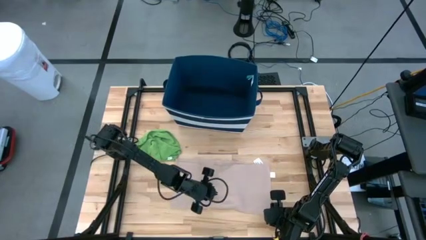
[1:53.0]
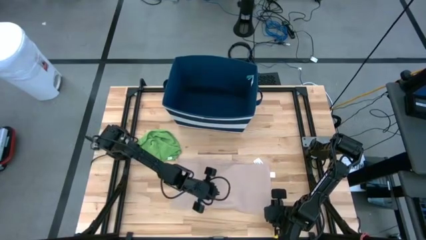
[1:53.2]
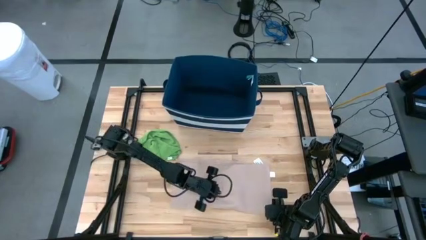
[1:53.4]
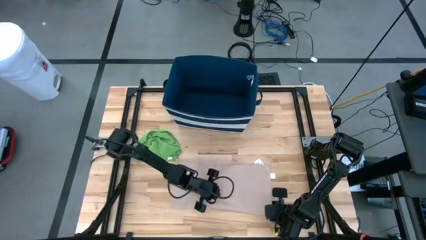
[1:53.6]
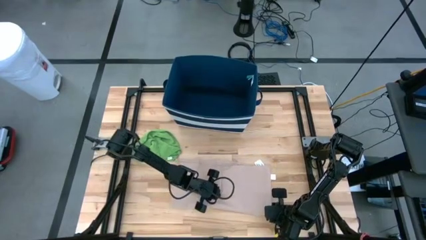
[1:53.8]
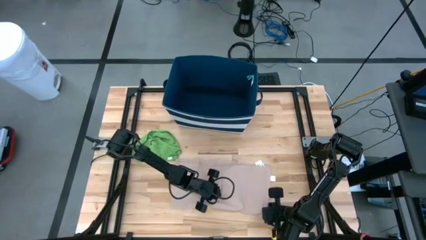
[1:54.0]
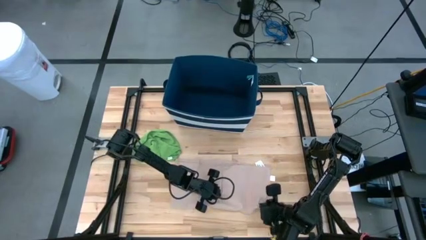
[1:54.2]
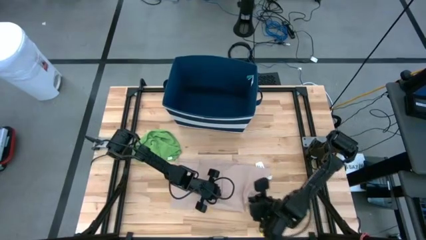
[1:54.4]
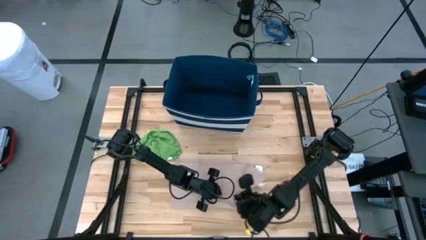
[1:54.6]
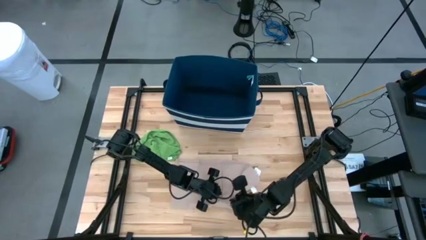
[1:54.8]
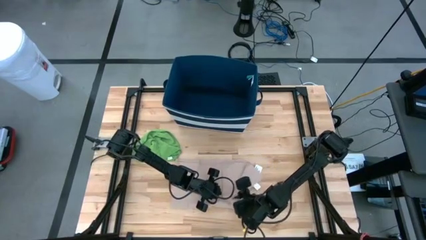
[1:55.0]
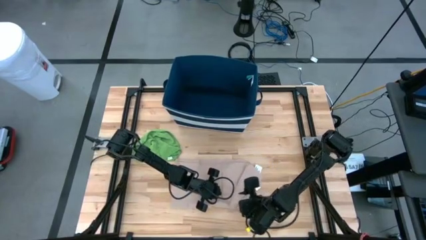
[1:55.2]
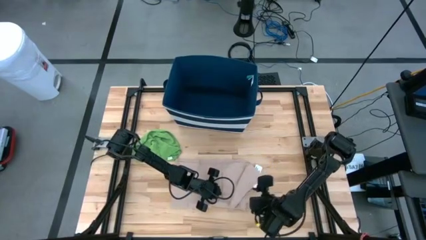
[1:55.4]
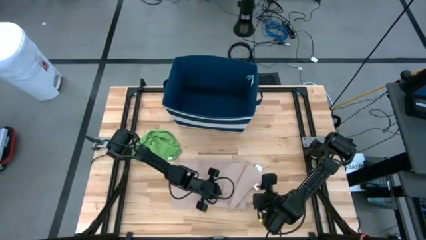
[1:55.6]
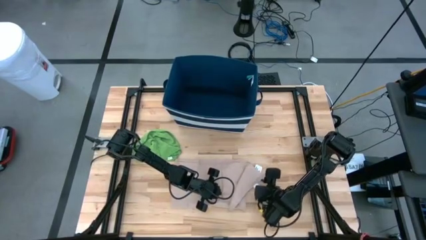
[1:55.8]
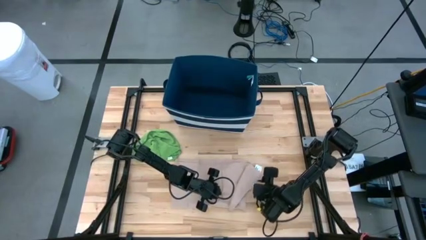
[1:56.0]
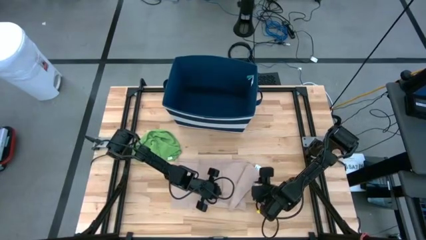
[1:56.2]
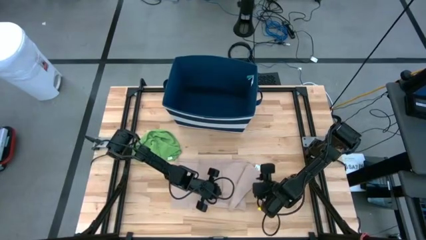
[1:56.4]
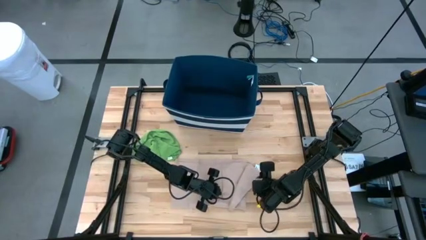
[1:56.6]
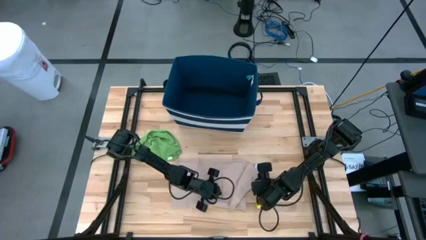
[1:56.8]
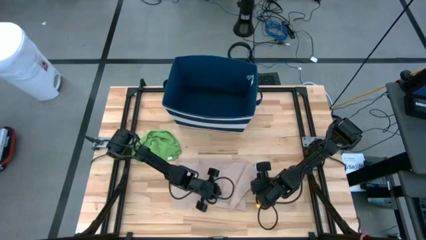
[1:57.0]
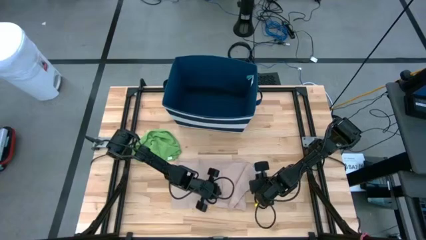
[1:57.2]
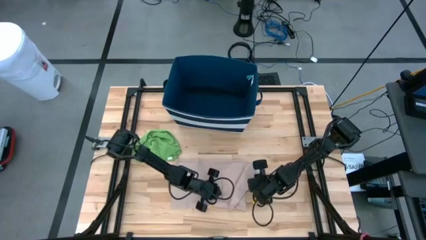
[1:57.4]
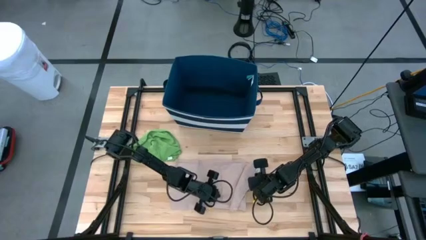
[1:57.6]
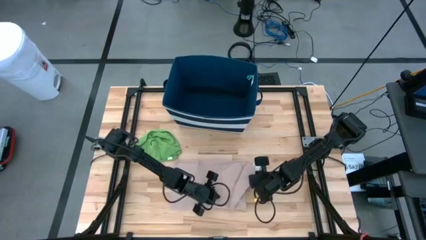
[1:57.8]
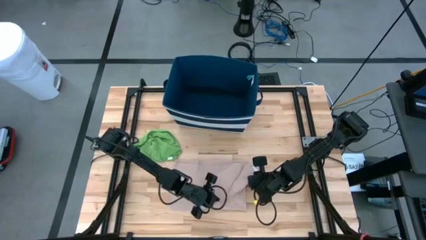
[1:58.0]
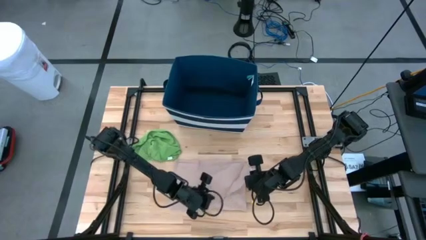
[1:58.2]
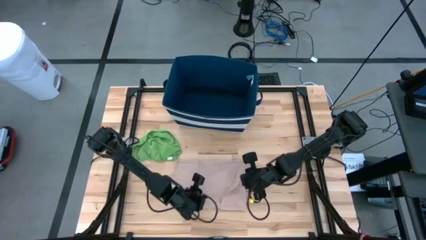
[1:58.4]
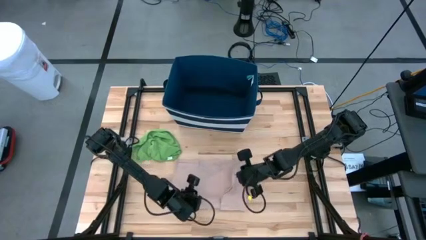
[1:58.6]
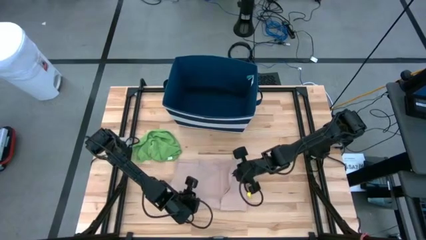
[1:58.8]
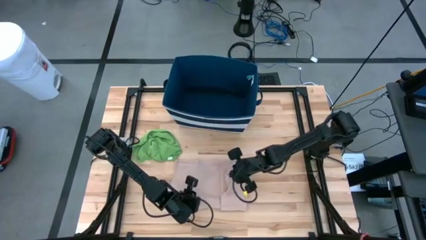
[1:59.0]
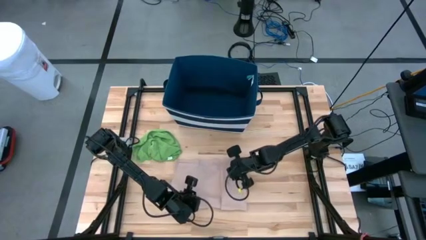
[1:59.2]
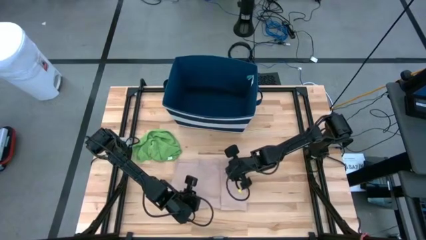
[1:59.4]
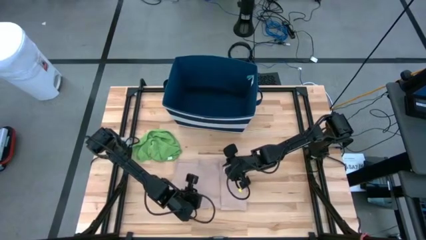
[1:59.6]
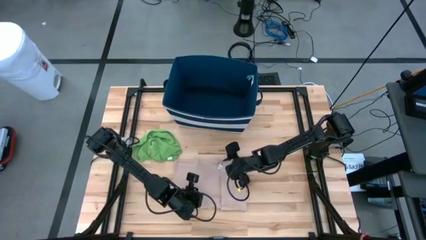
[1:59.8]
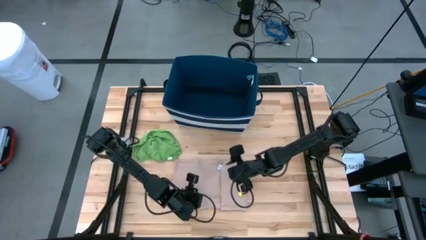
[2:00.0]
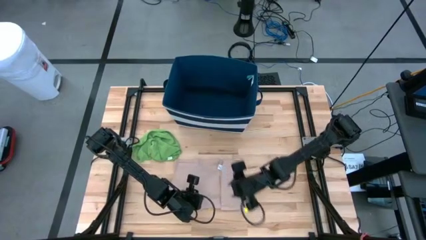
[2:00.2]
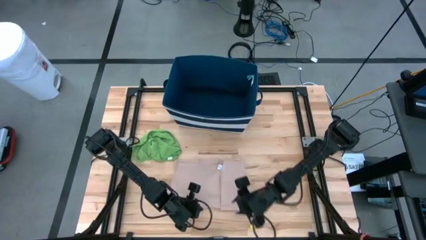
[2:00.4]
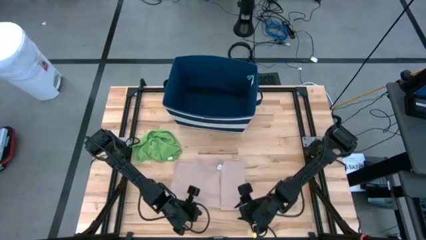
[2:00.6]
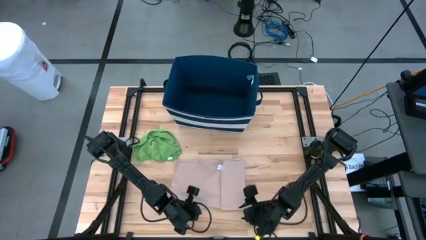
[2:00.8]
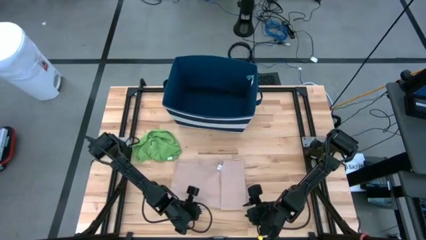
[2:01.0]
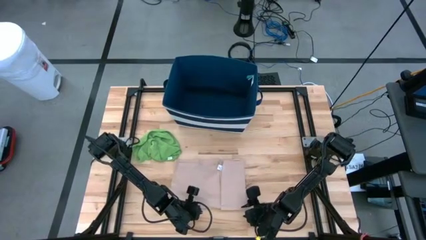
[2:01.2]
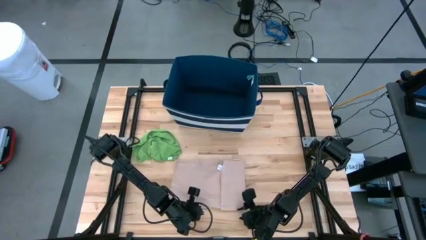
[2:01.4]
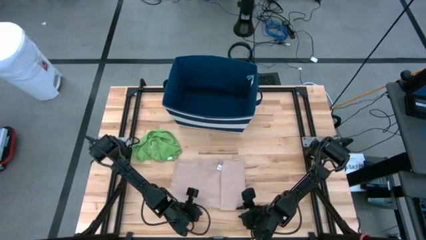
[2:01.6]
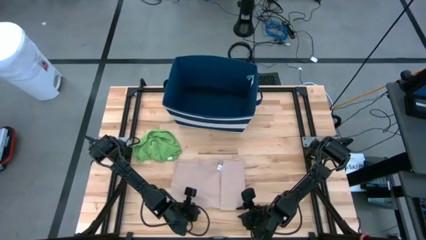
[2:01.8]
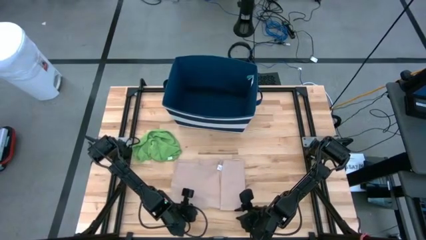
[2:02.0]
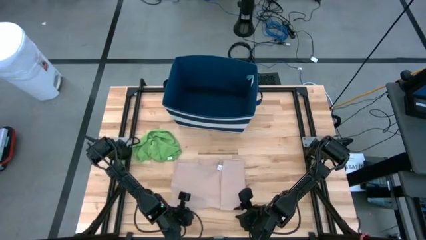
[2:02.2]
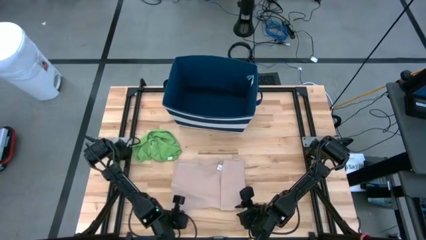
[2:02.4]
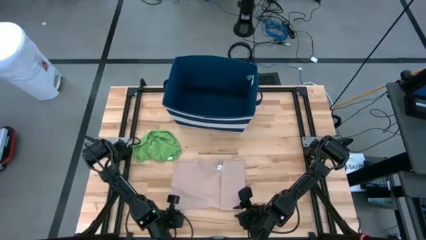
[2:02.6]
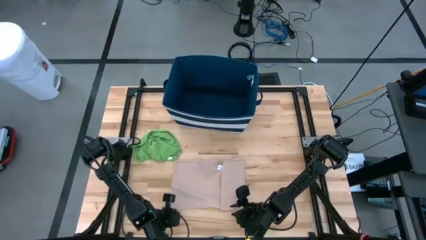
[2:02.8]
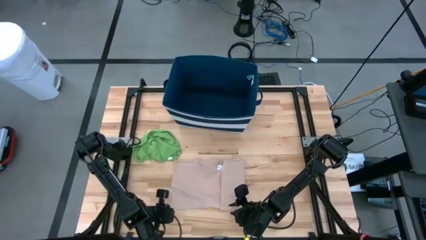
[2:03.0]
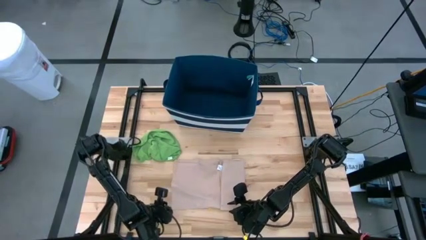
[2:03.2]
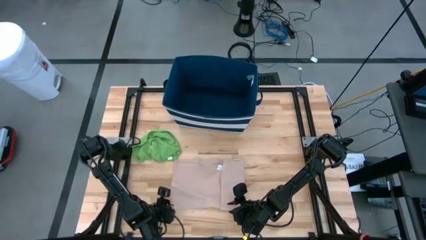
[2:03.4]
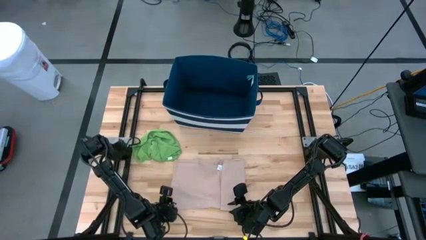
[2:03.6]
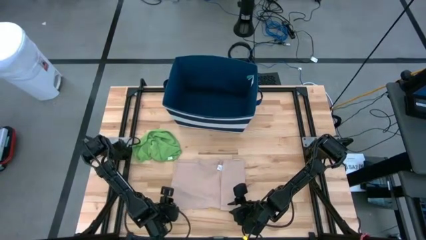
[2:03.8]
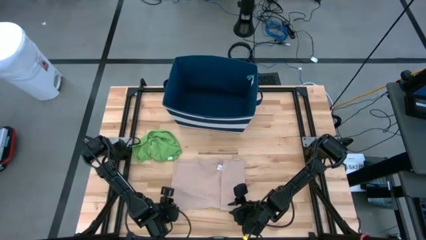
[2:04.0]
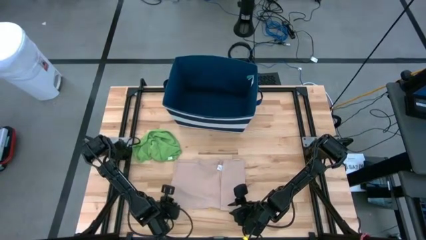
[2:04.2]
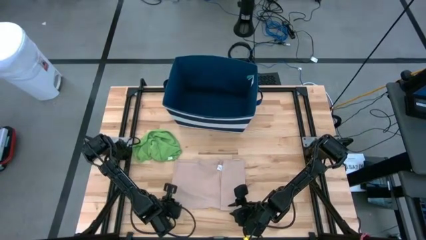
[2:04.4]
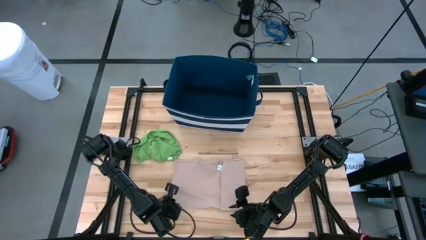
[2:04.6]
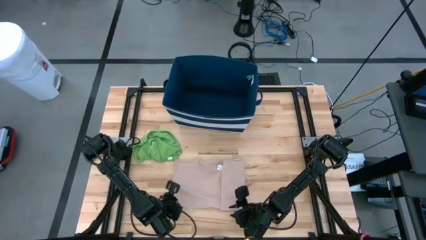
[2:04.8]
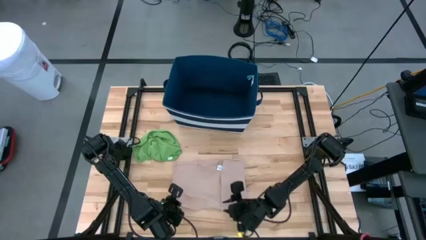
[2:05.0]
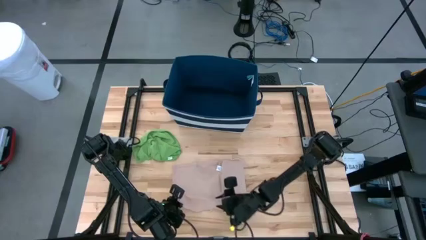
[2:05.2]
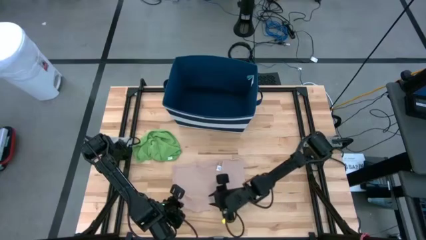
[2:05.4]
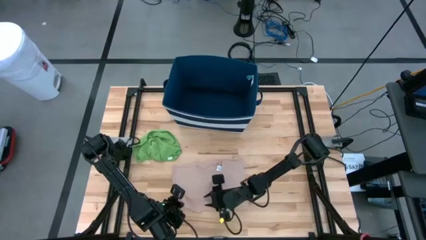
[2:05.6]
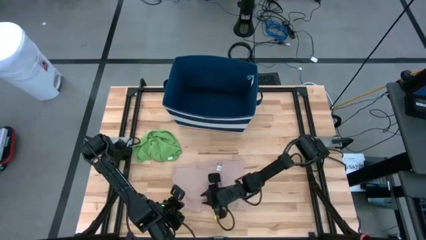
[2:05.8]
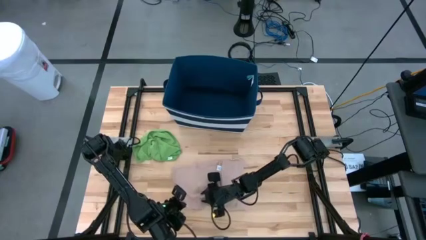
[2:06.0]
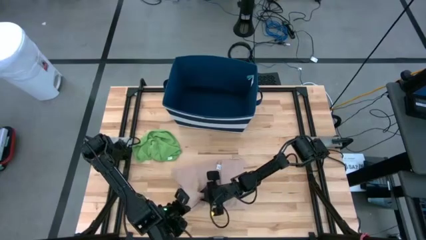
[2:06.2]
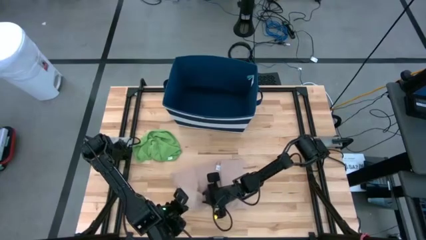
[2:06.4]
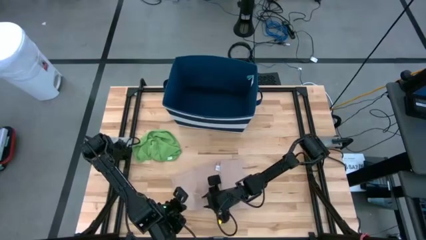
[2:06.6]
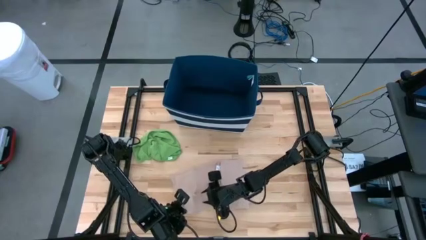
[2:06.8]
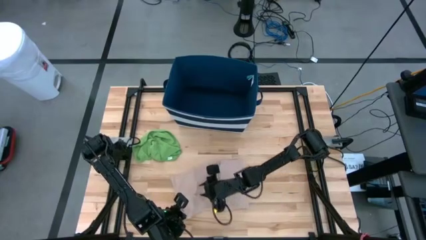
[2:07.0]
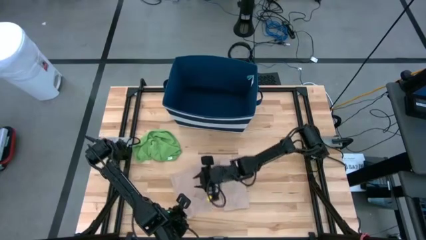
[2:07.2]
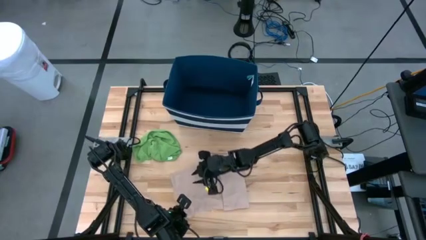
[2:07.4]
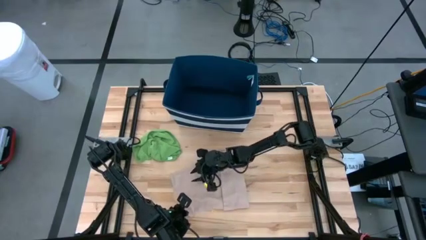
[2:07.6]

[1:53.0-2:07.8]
Task: Fold towel
Fold the brown towel

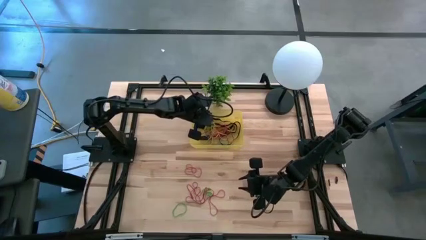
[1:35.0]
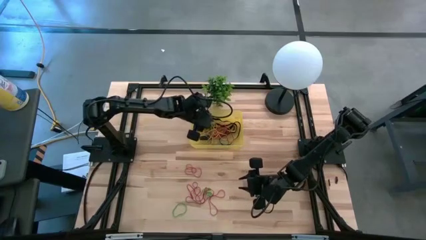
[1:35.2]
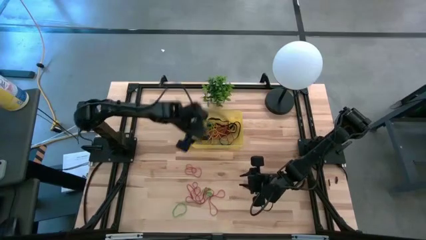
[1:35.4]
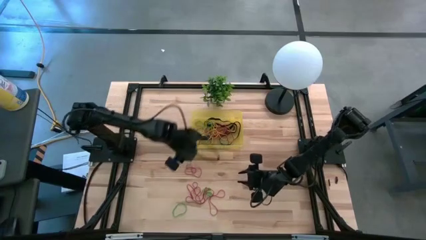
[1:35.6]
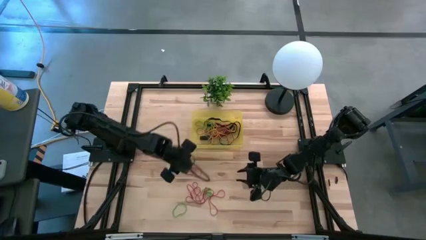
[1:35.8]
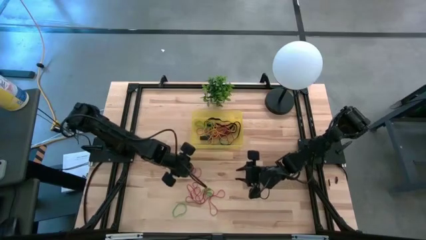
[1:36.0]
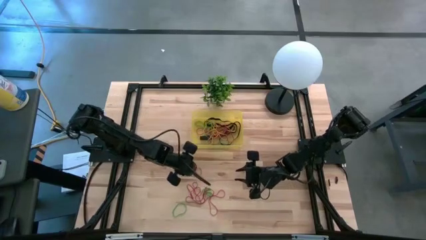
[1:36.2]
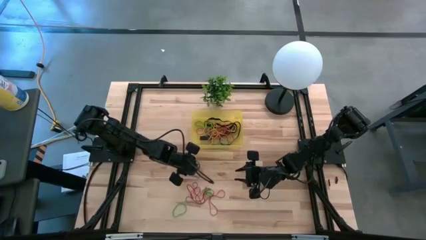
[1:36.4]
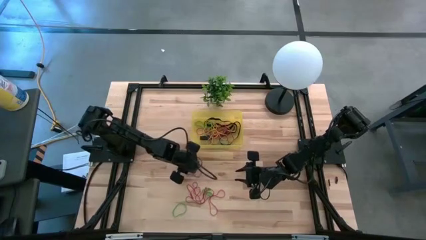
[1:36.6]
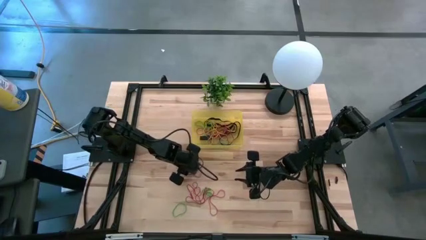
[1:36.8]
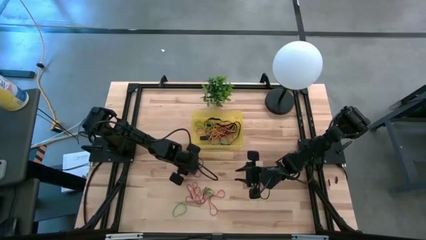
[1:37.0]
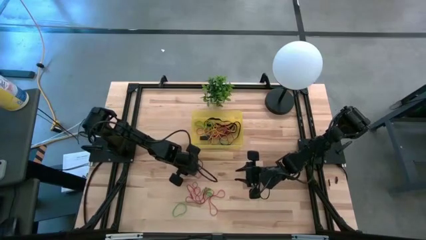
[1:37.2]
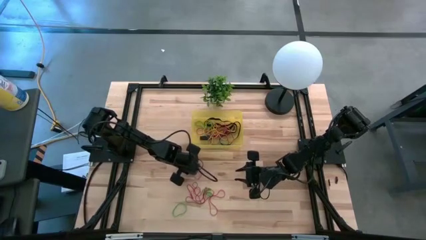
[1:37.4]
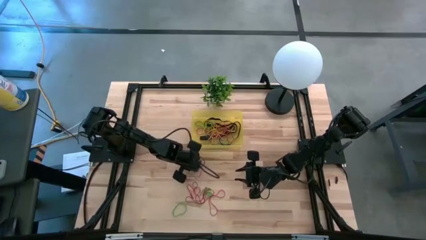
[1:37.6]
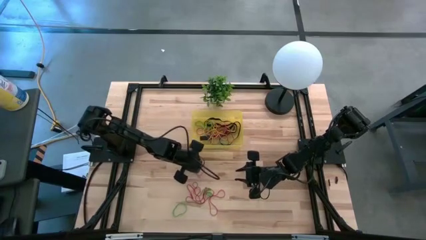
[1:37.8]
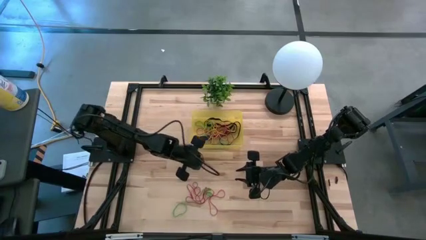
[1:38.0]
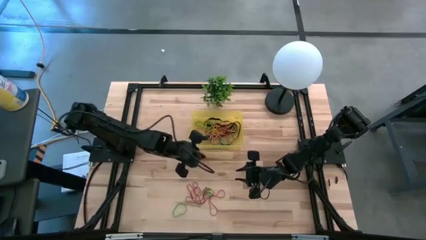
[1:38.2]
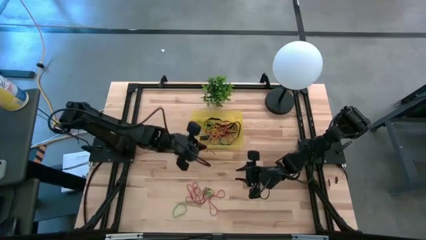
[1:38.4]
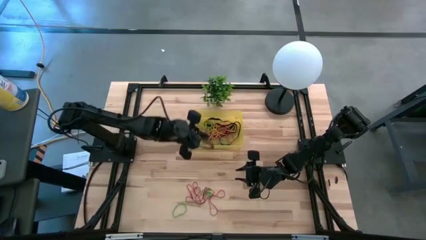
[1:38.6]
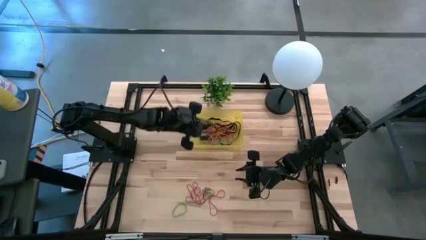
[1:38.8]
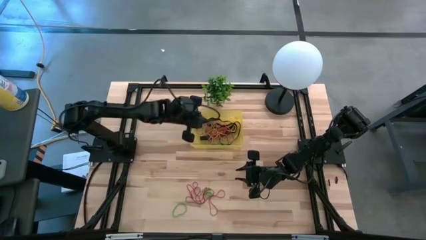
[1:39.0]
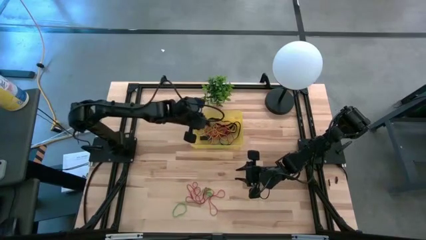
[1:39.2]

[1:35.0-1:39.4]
Task: Pick and place rubber bands into bin
Put the red rubber band into the yellow bin
